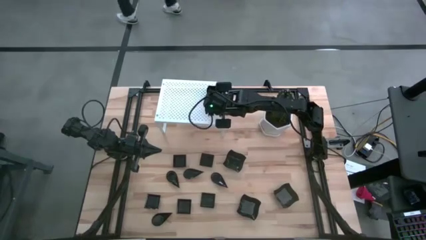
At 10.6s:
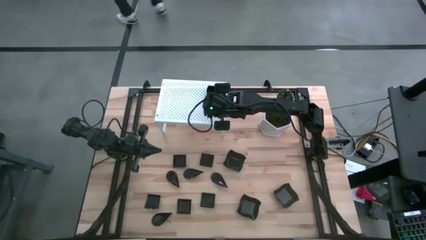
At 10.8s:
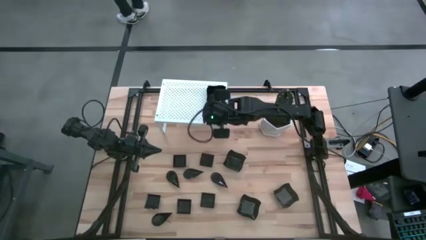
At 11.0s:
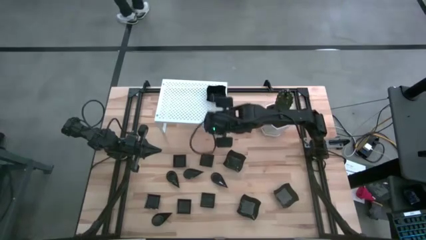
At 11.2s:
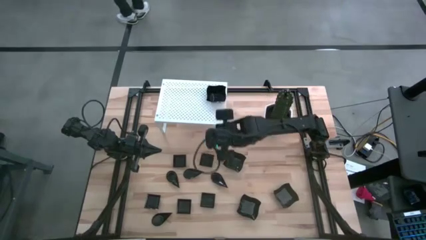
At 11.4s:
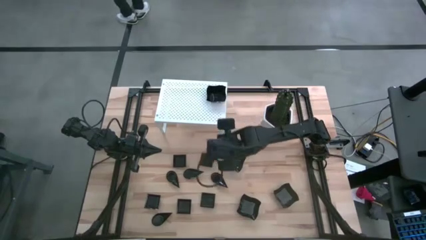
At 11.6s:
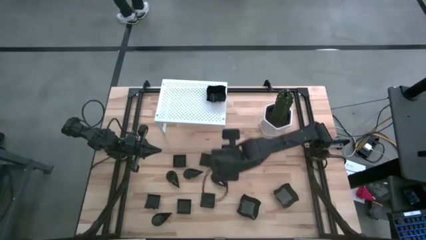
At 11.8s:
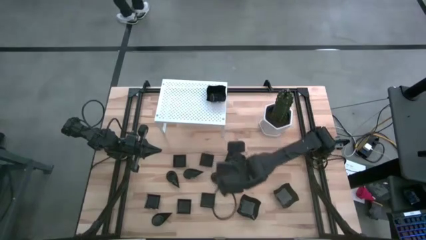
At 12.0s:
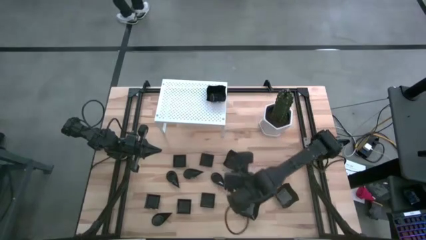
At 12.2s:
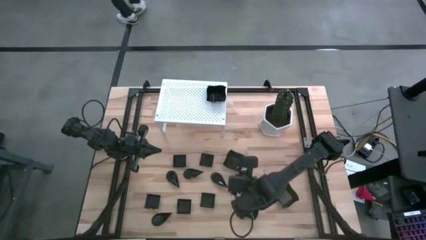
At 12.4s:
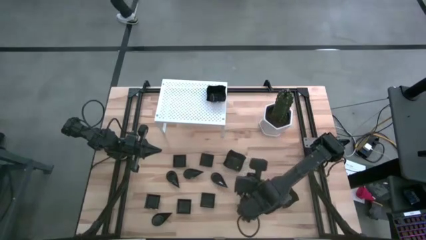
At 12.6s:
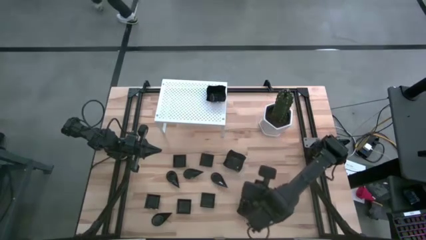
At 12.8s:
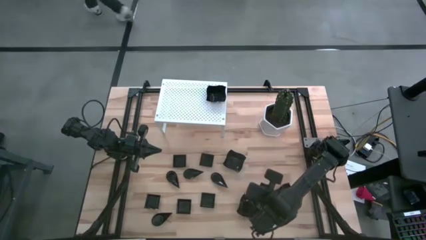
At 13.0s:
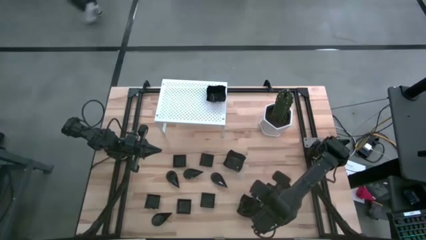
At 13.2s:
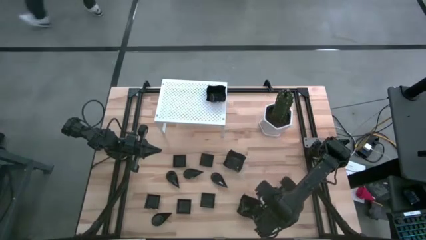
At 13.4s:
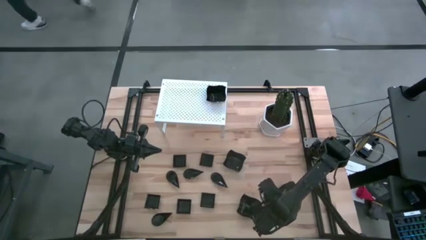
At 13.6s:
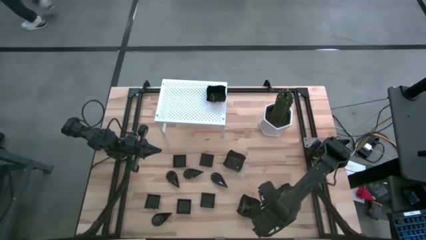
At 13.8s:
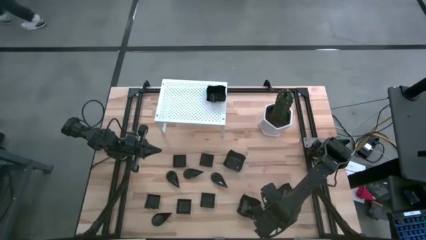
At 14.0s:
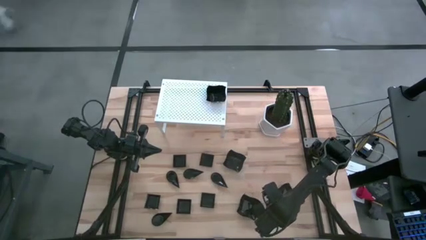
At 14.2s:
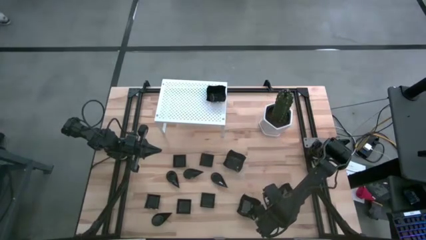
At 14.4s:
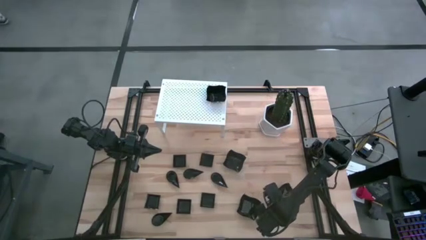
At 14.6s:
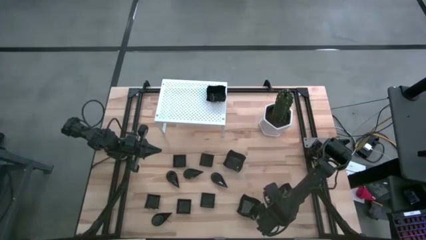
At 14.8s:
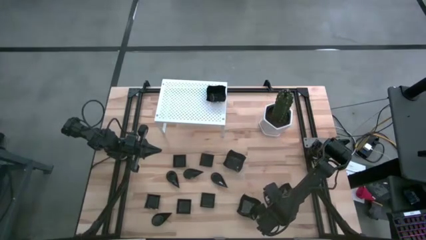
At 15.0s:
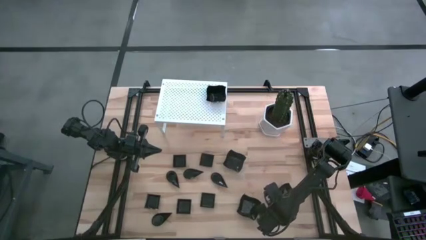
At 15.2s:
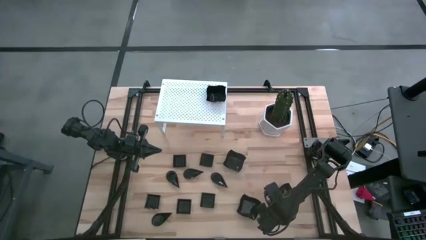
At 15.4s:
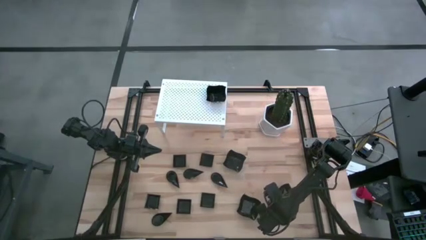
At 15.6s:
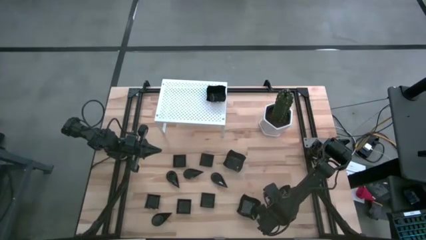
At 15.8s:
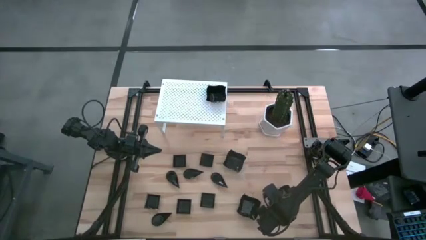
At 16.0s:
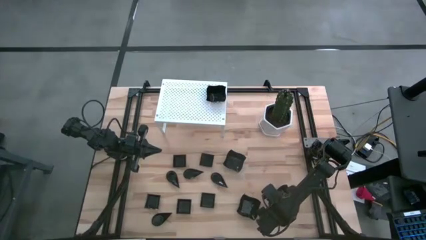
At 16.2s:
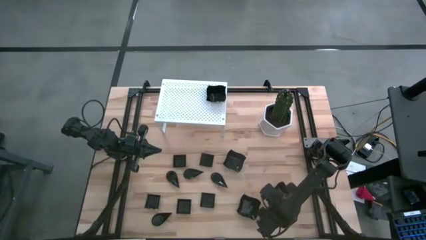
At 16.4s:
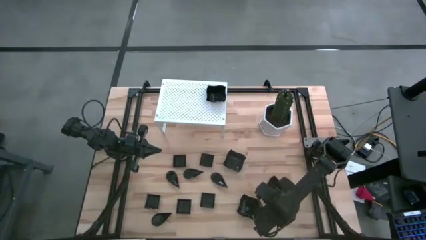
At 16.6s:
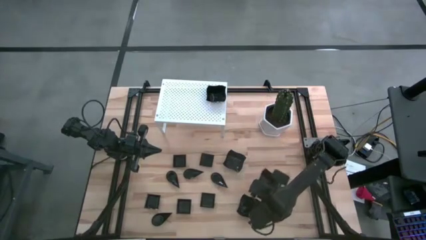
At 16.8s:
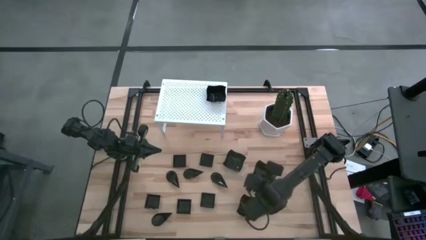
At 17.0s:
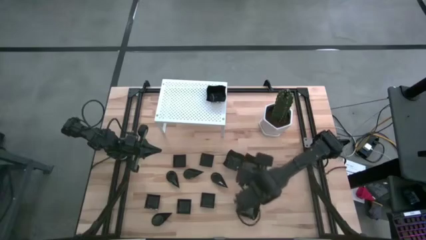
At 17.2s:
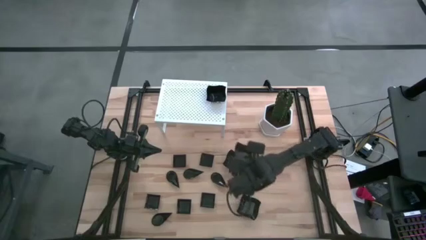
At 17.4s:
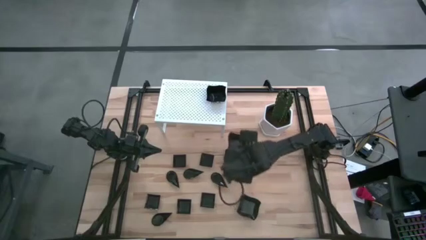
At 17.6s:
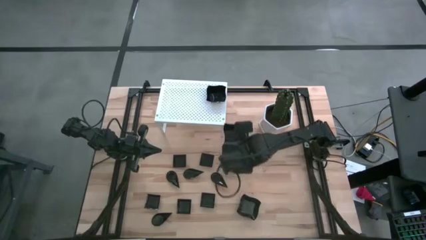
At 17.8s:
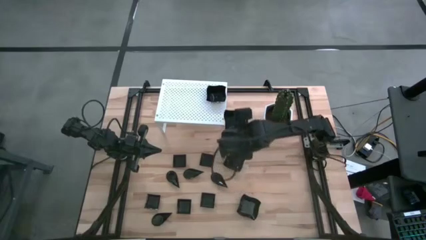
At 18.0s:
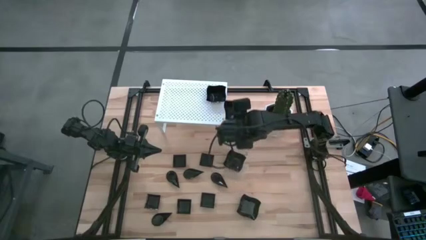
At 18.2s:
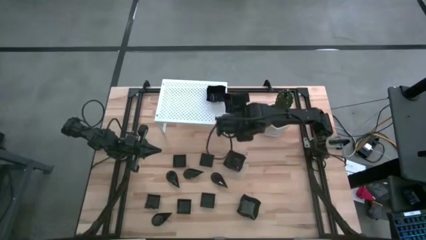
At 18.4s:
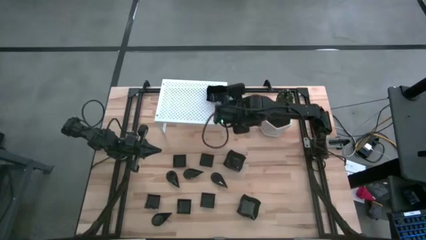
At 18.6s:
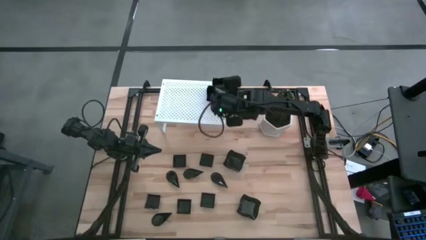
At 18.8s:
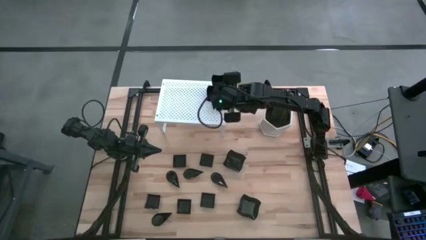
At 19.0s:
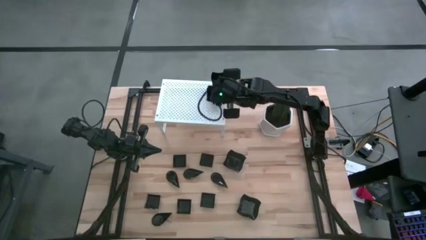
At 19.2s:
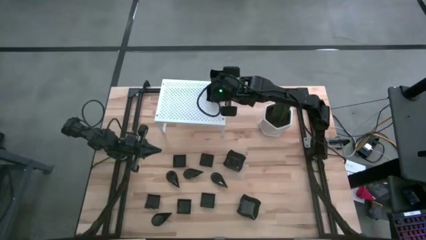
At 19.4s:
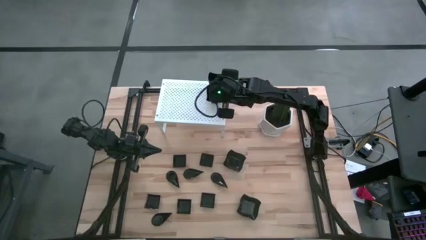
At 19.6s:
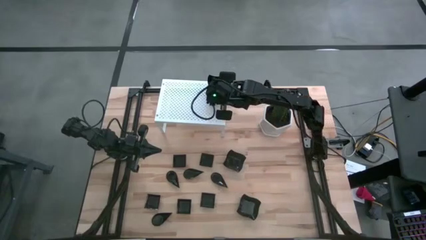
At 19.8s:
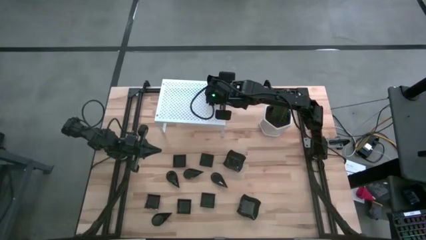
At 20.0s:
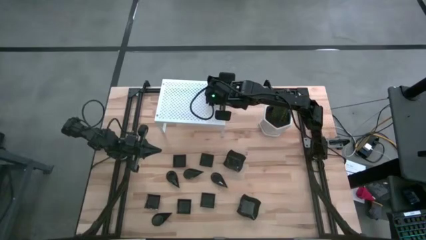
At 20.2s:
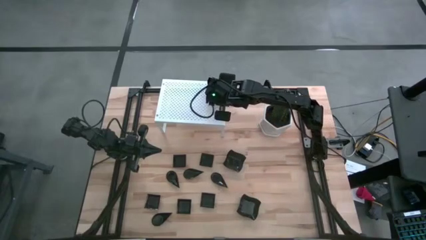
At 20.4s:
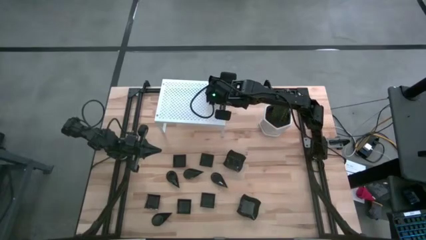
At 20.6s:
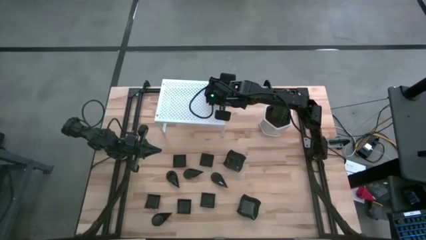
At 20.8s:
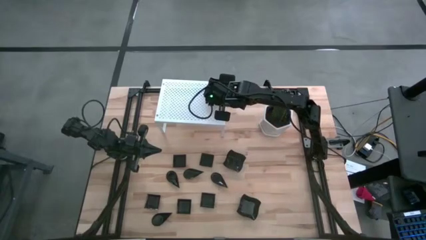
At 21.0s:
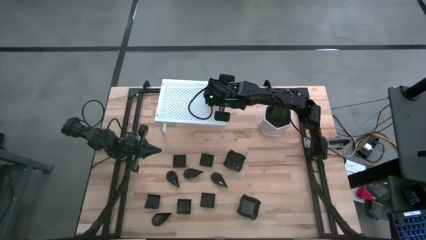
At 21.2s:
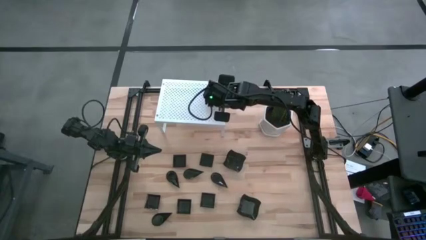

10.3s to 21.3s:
Task: Pick & Place Mini shaped plates
Stack the distorted square plate on top of the other distorted square plate on the shelf

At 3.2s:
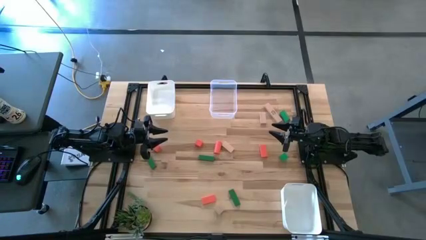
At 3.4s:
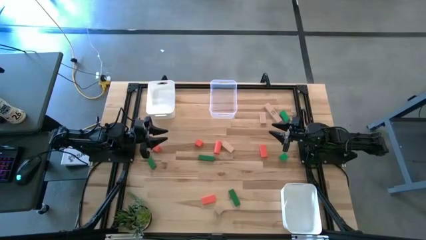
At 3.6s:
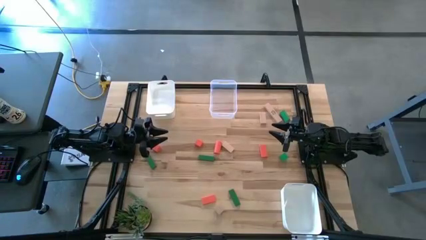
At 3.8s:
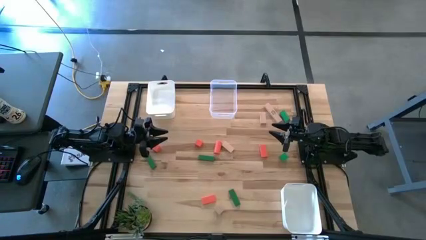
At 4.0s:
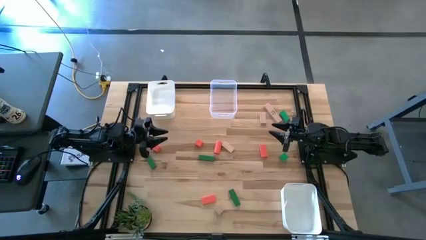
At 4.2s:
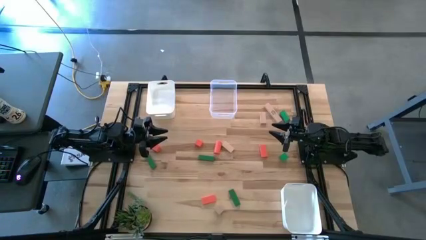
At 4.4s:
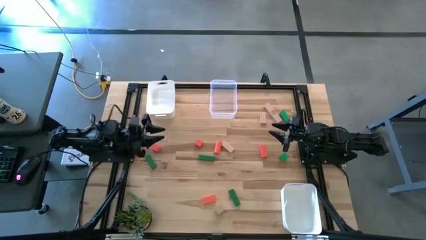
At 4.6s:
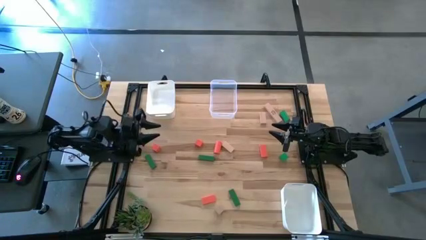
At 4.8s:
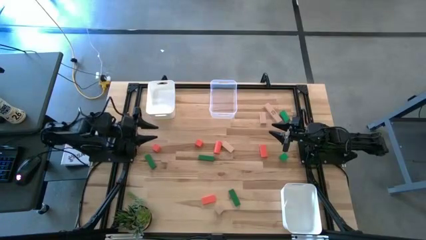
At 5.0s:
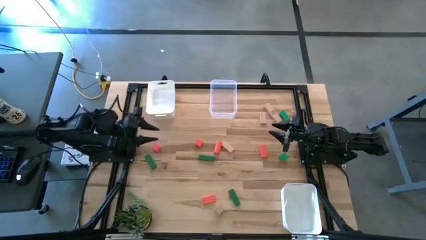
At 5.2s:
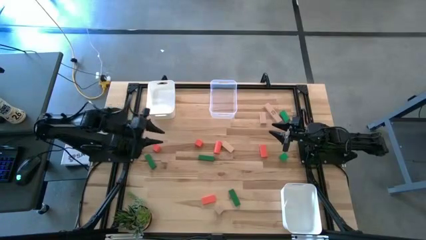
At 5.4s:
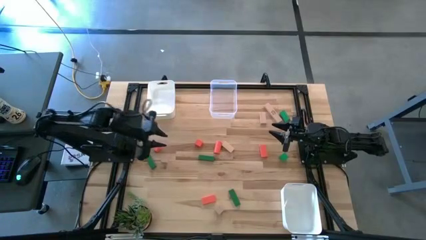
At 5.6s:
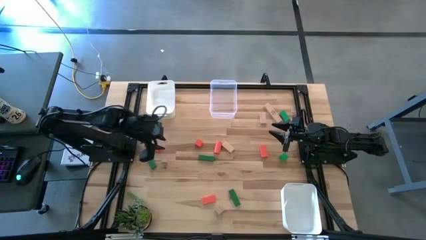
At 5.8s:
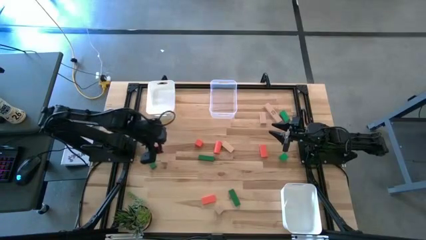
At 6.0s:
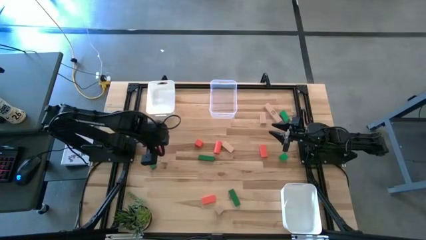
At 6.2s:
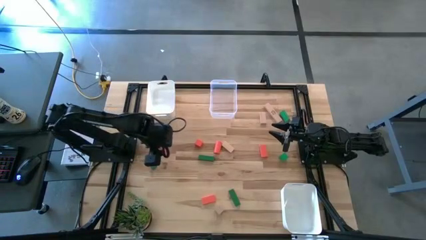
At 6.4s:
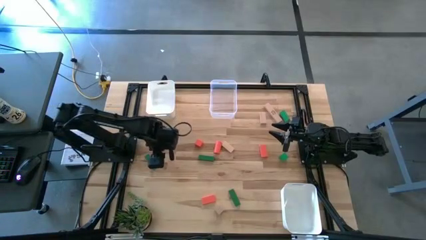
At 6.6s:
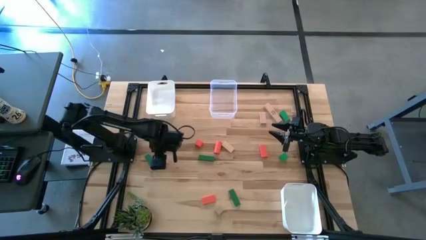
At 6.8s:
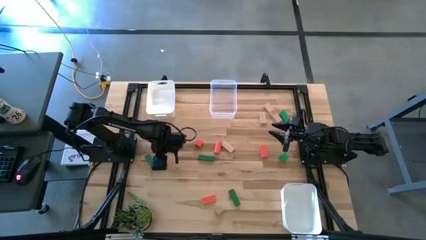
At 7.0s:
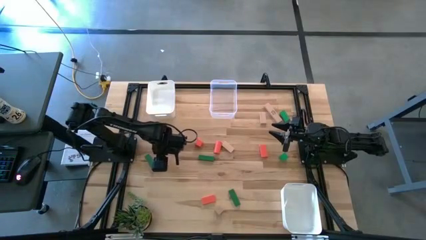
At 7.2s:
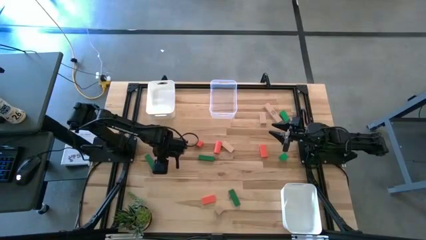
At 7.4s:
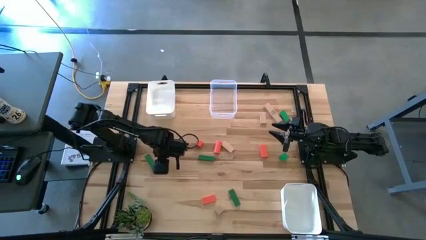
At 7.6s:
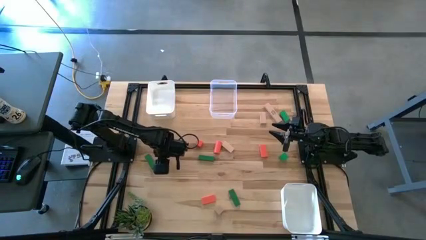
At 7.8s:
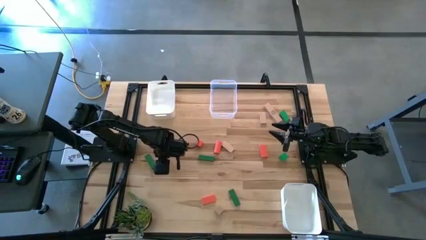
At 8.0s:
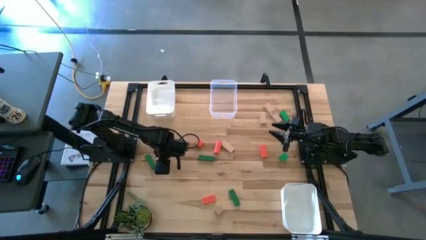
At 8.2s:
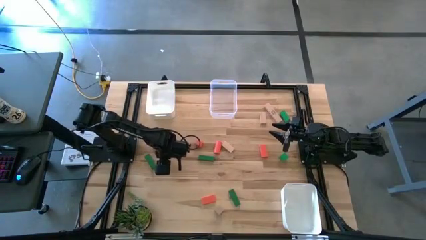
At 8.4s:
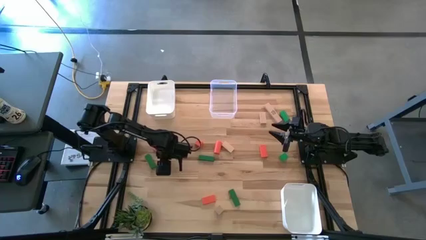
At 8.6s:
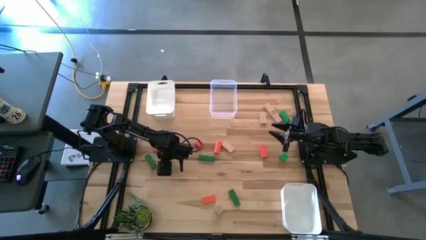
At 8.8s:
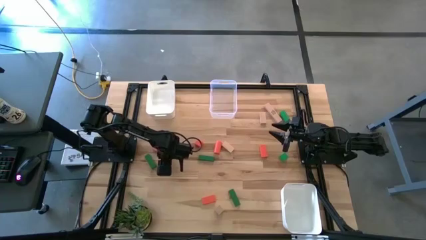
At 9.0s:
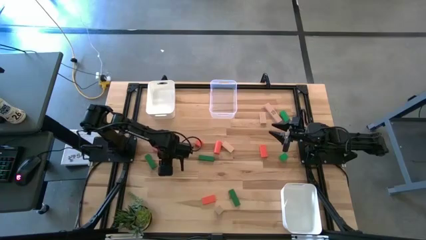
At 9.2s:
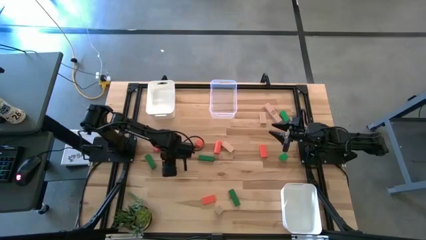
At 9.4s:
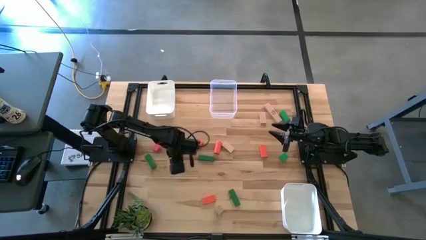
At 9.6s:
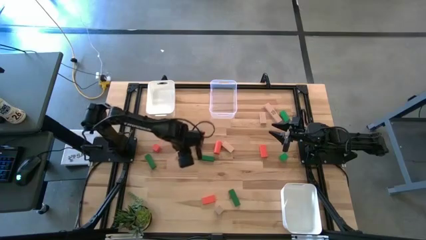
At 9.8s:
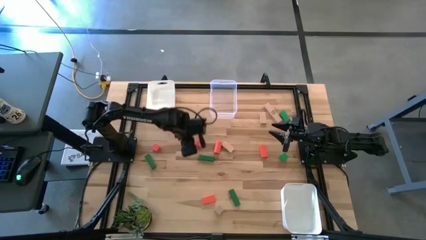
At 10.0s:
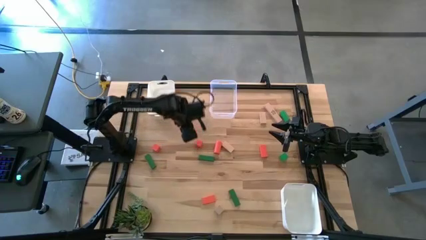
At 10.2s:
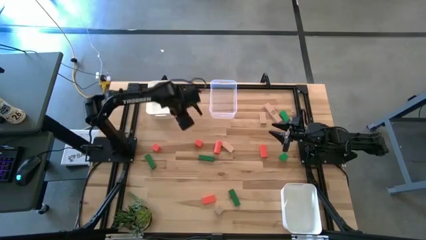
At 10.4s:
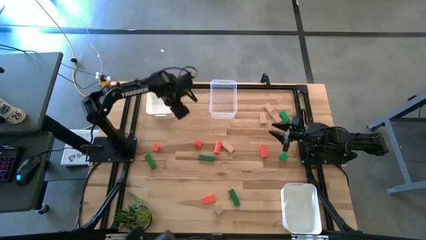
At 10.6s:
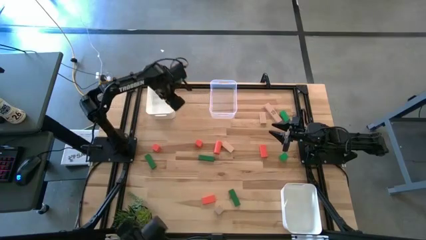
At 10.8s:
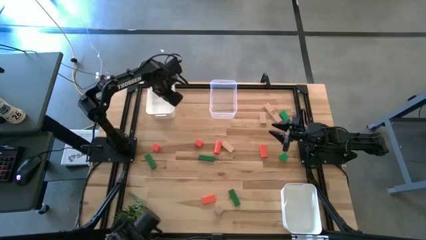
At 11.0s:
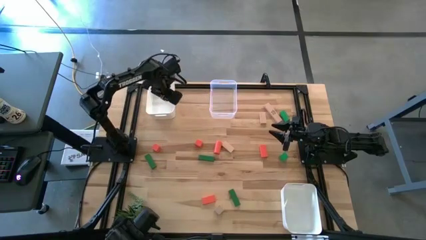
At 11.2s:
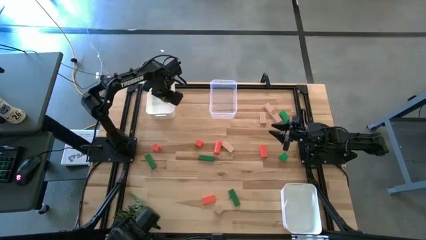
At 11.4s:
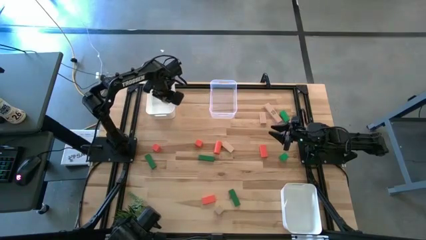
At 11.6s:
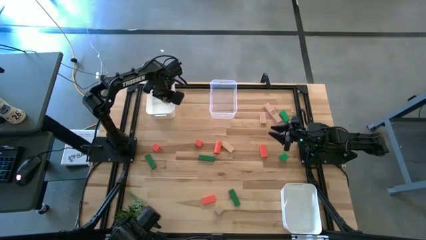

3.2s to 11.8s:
Task: Sort & place blocks by color
Put the brown block into the top white bin
